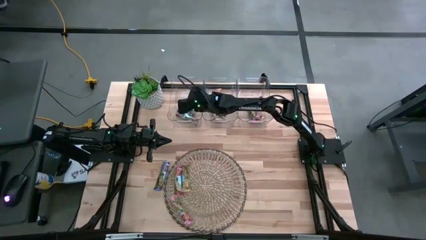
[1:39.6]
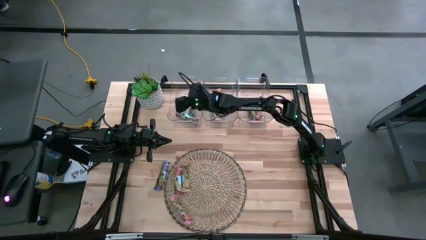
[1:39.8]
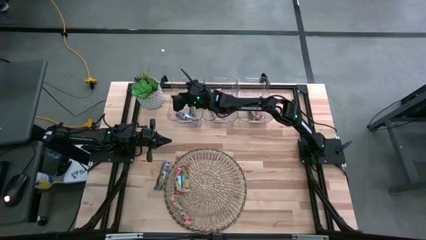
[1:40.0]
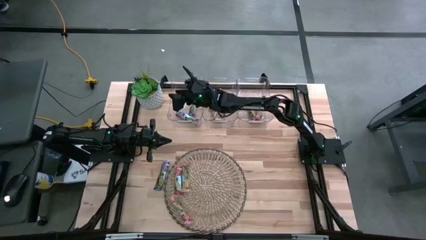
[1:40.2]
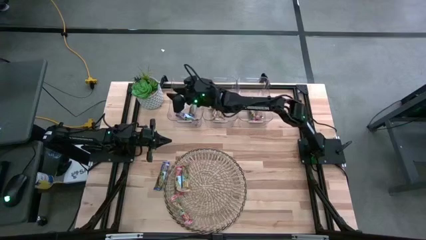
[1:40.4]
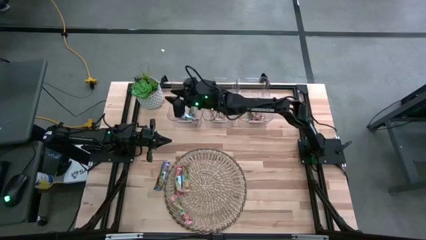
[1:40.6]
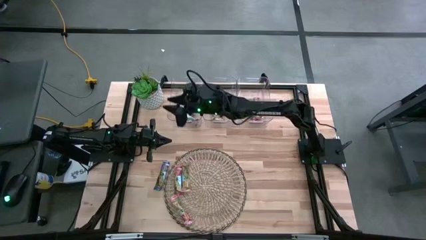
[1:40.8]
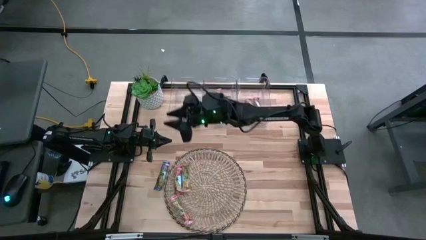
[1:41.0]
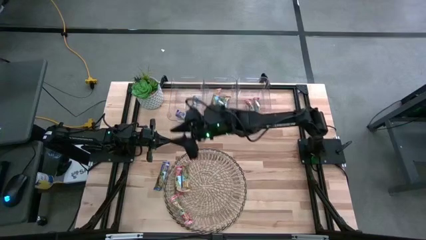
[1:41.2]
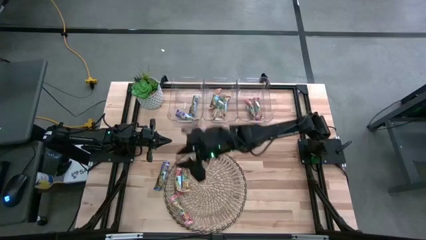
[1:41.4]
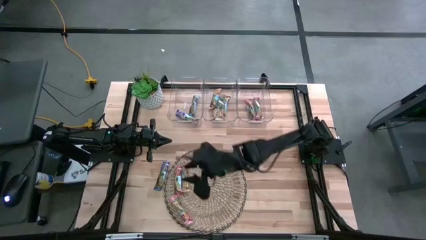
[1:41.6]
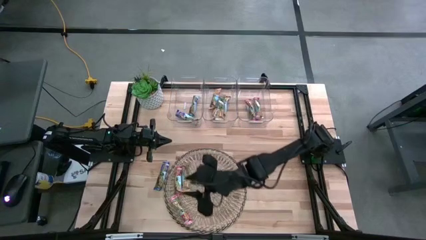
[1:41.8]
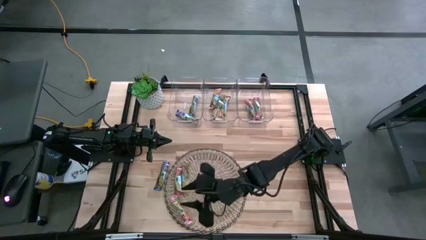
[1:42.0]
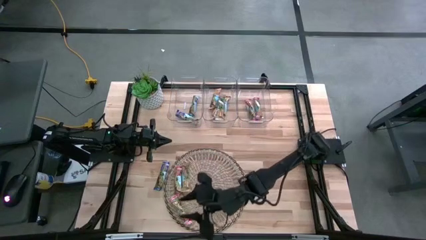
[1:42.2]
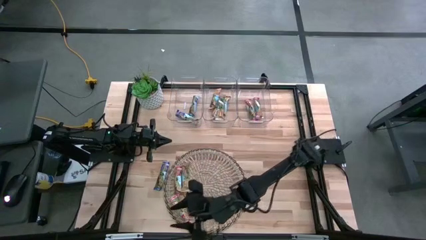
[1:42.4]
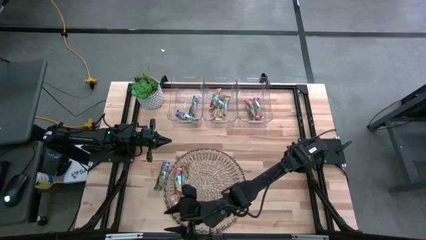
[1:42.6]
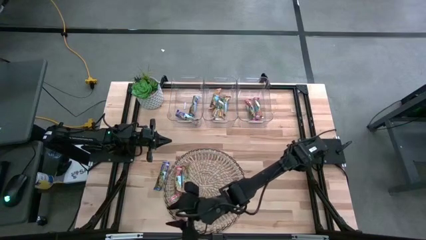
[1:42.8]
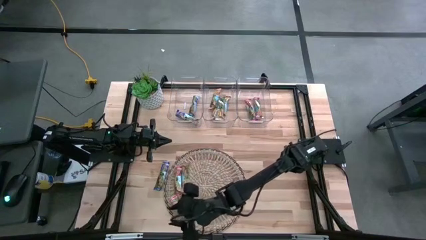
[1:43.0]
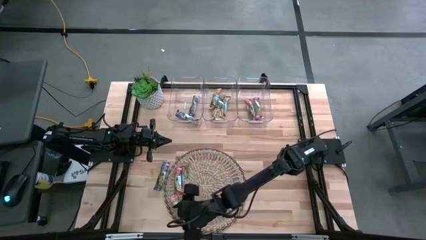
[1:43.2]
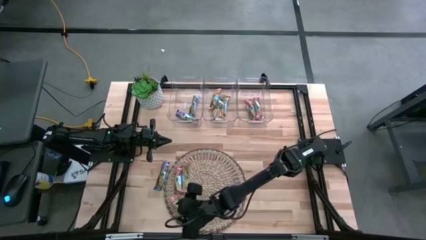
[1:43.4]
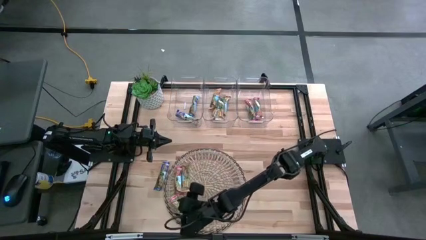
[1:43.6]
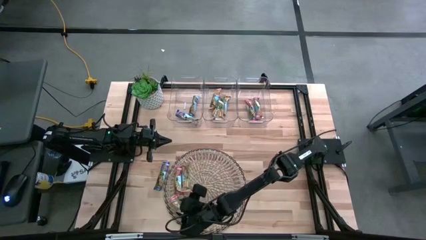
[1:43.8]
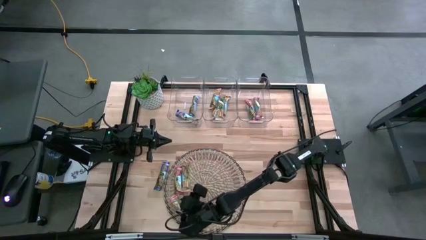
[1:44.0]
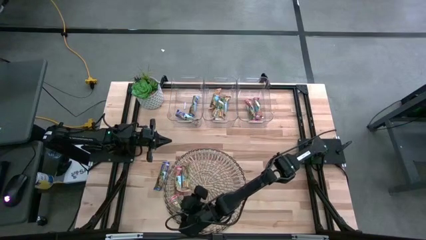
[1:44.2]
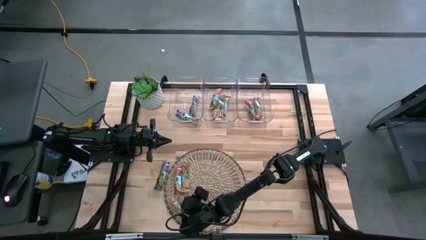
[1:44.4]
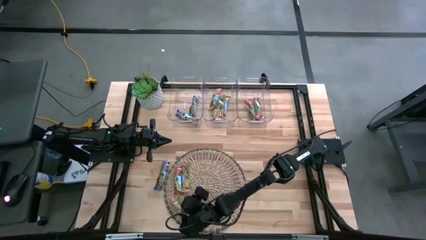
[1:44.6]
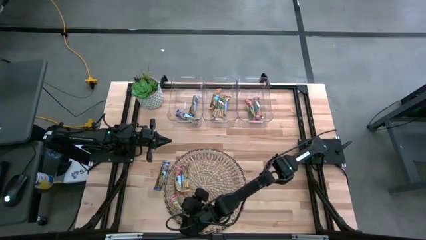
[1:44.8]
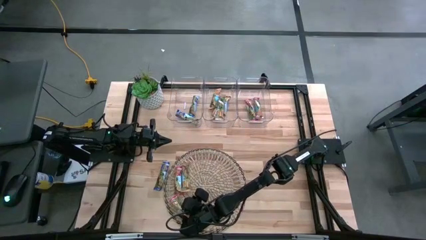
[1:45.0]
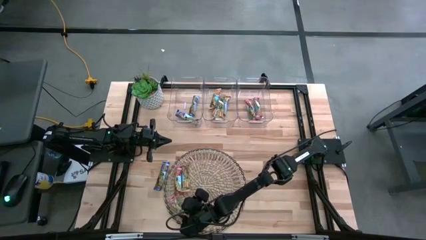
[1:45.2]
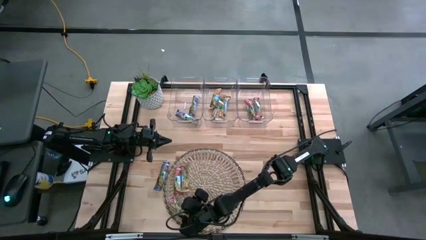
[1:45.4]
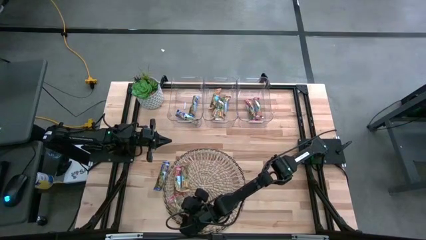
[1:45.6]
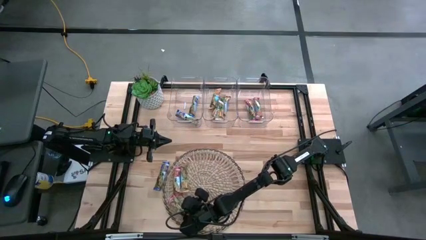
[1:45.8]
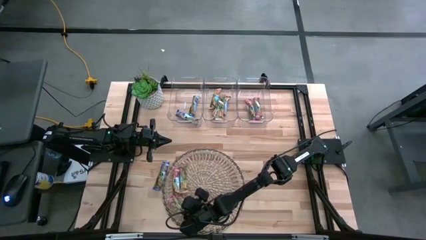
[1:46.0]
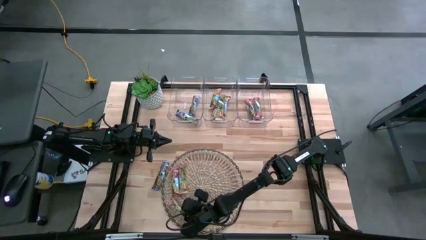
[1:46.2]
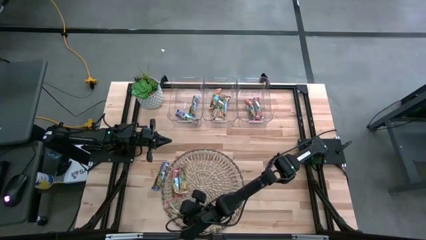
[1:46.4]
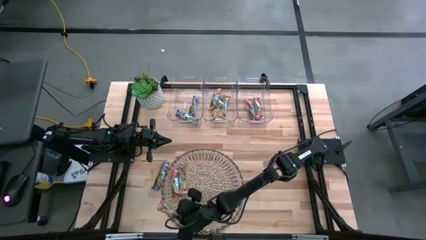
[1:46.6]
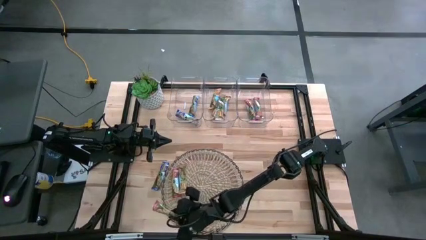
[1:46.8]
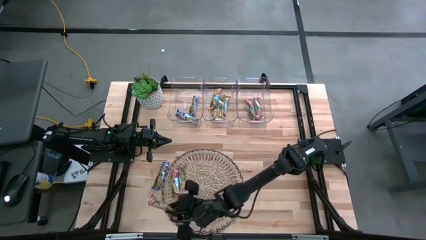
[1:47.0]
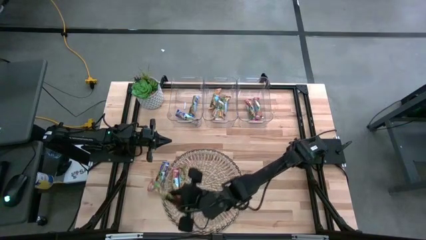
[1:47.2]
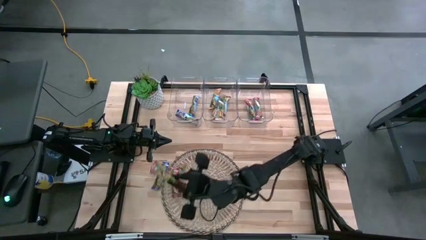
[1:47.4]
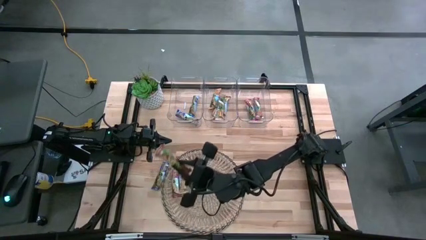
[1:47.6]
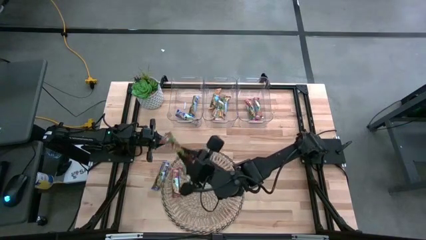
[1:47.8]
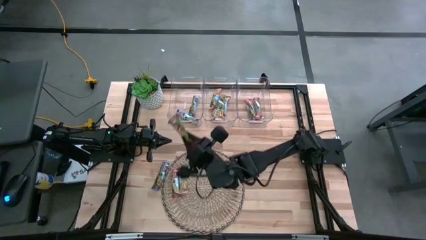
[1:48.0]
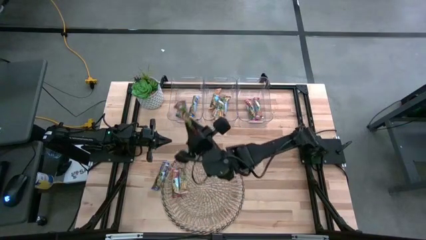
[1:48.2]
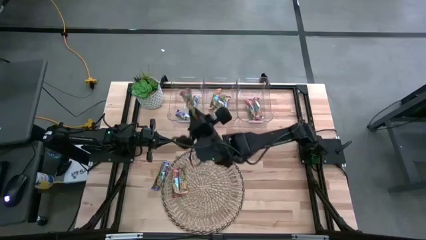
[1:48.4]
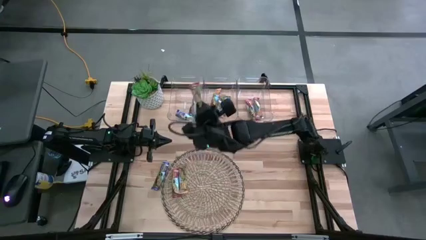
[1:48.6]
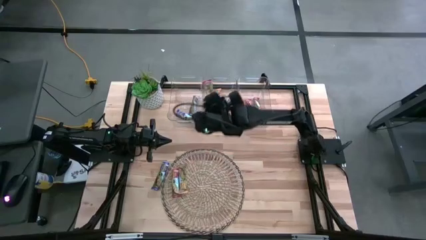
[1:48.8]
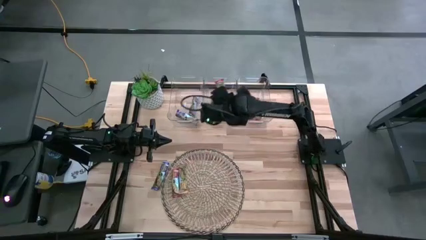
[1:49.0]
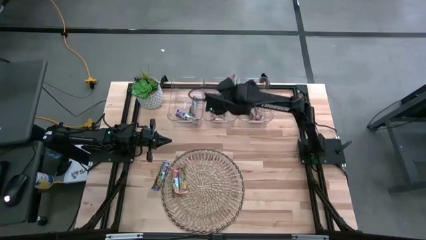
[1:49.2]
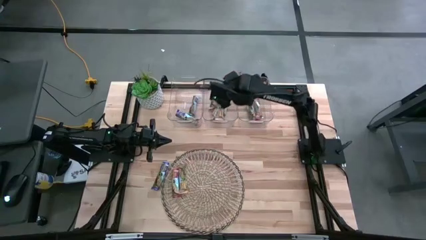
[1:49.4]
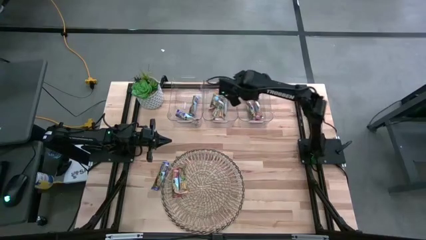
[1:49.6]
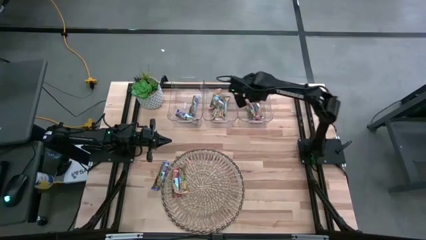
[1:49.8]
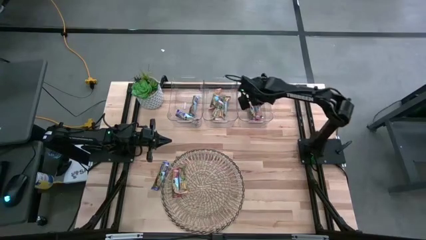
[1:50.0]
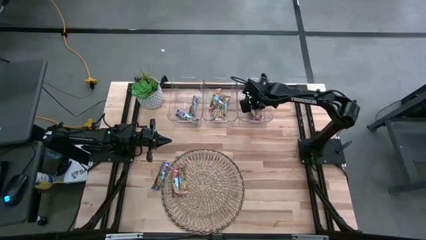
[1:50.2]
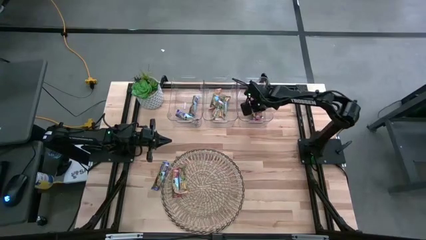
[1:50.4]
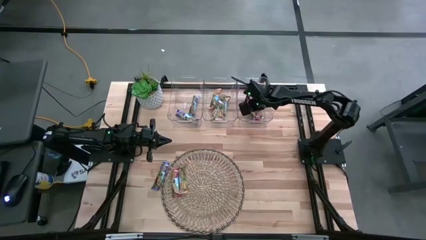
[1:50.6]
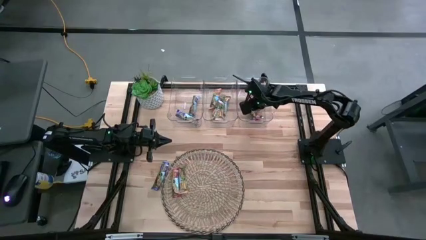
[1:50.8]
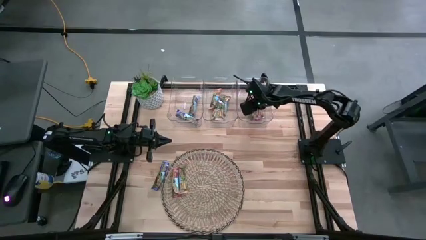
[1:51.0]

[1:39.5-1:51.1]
Task: Pick and place Granola Bars by type
Put the red granola bar into the right transparent bin

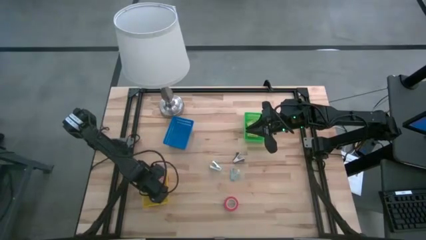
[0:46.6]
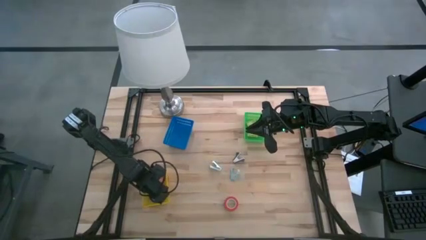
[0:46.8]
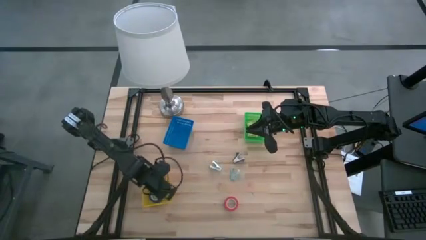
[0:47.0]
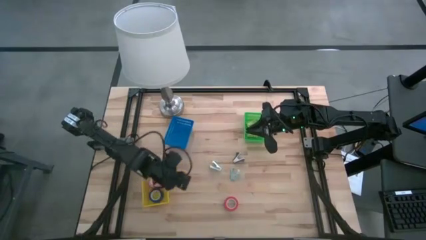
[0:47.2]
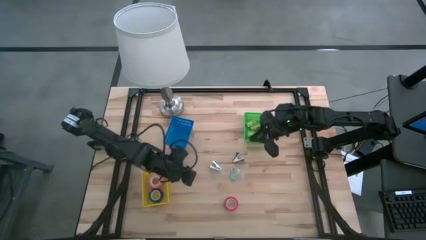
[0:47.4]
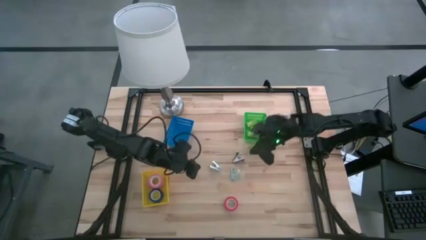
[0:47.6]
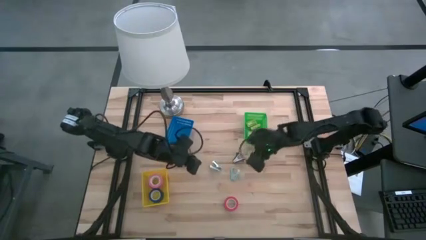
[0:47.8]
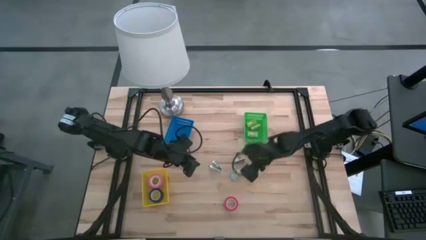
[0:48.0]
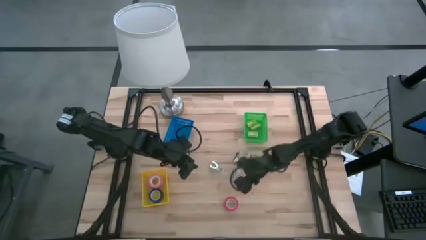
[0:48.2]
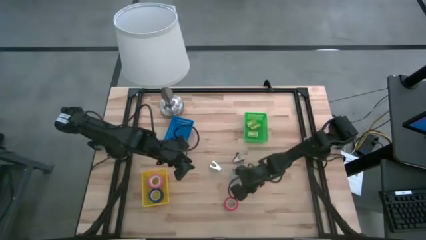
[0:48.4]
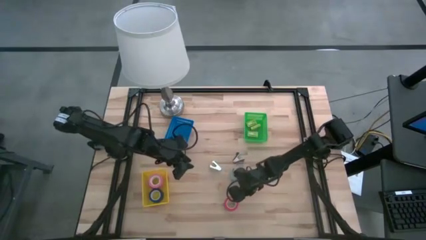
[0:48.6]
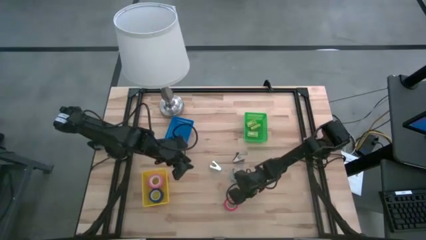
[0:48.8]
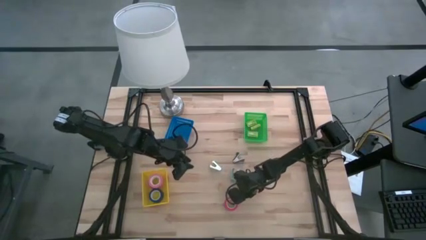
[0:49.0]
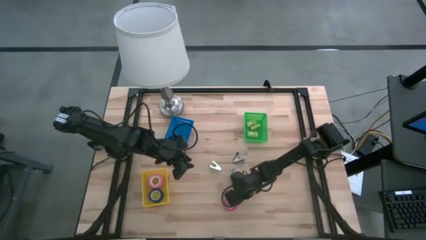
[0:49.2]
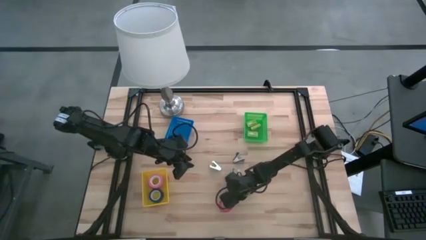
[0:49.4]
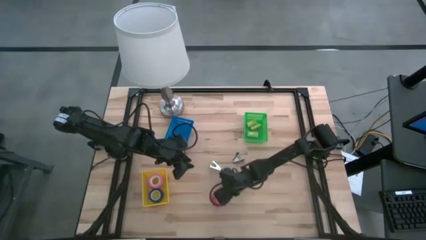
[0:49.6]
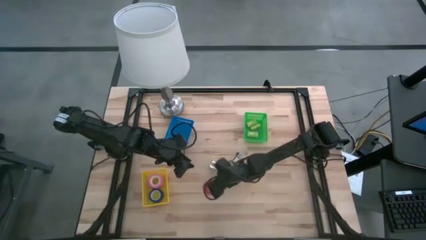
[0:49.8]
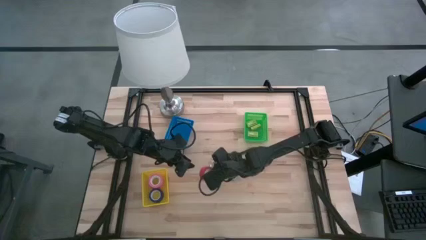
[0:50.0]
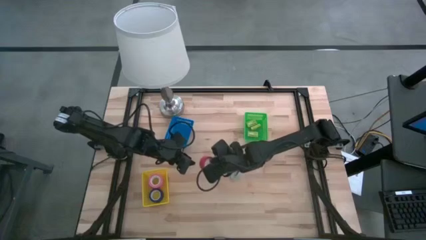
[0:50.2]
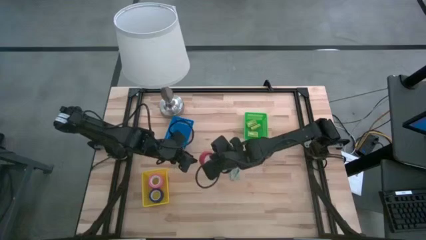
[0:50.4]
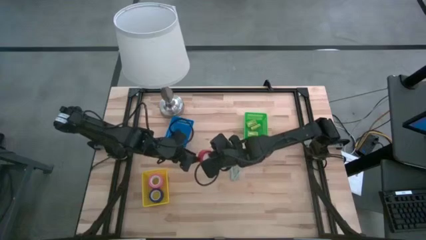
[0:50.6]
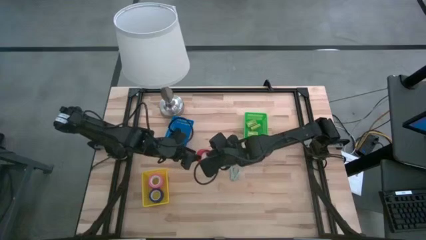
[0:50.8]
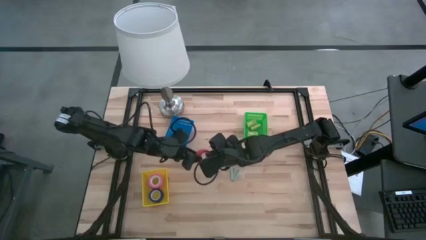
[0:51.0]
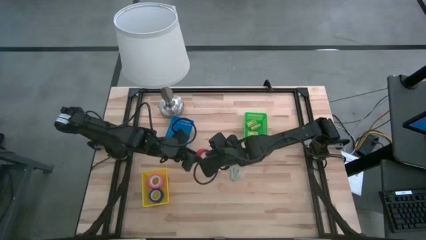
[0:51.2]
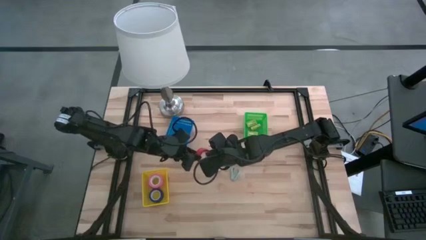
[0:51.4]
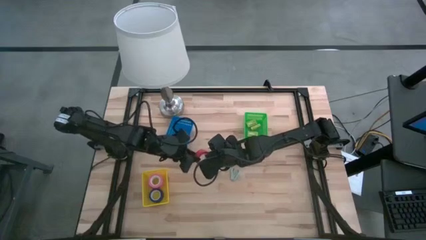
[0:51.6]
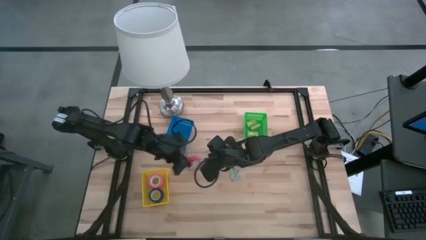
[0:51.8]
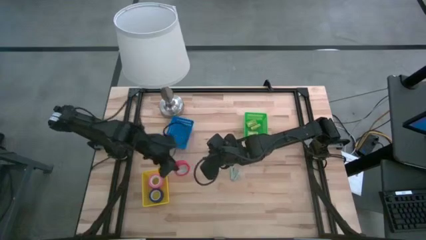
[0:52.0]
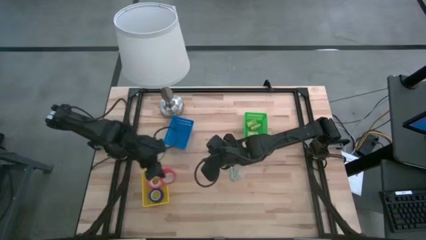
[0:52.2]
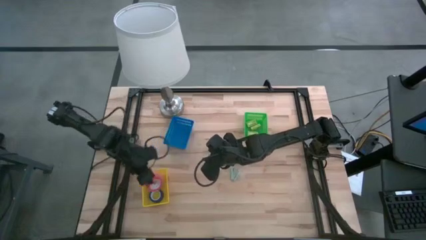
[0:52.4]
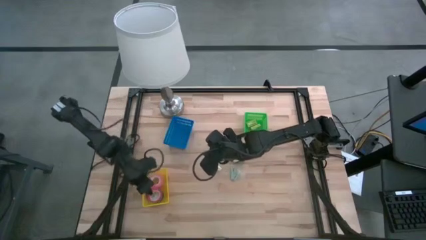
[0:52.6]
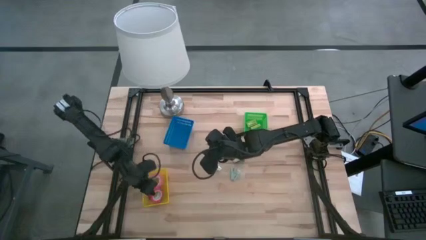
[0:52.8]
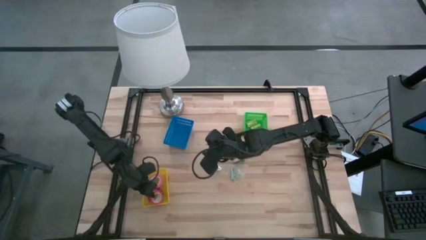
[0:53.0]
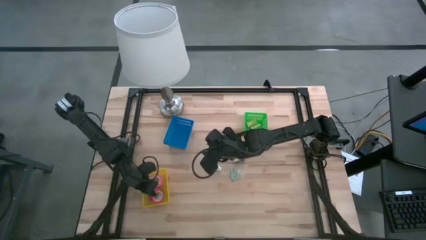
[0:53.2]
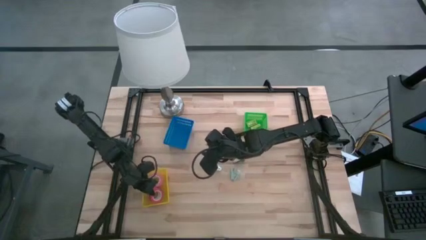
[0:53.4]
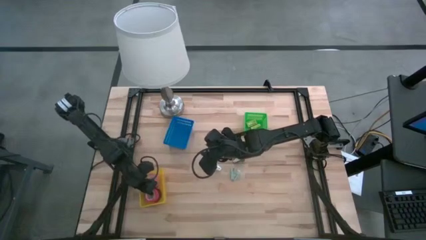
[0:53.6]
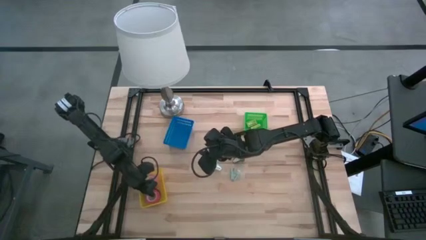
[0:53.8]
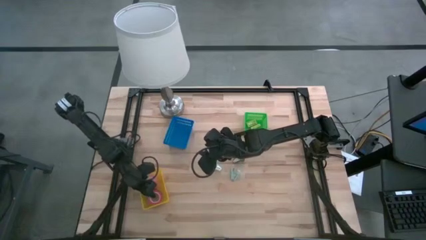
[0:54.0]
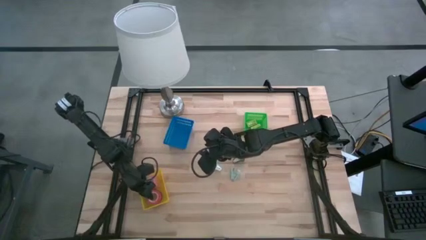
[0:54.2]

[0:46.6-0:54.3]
Task: Pick and place Stapler, Stapler remover, tape
Put the orange tape into the yellow bin
